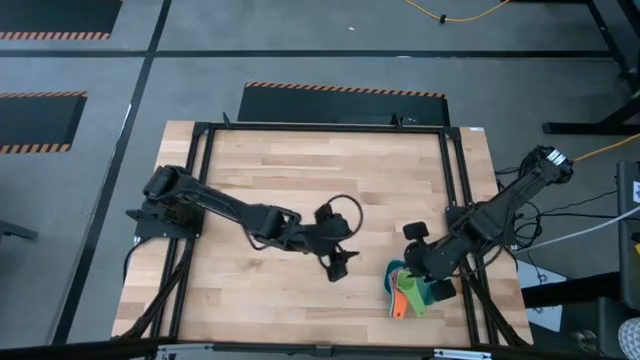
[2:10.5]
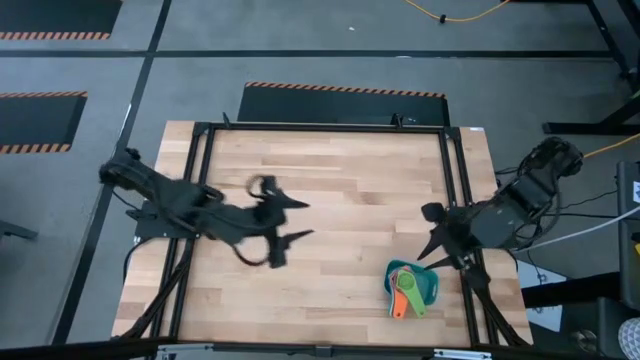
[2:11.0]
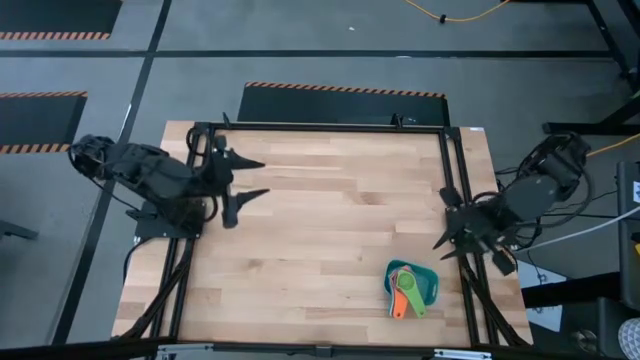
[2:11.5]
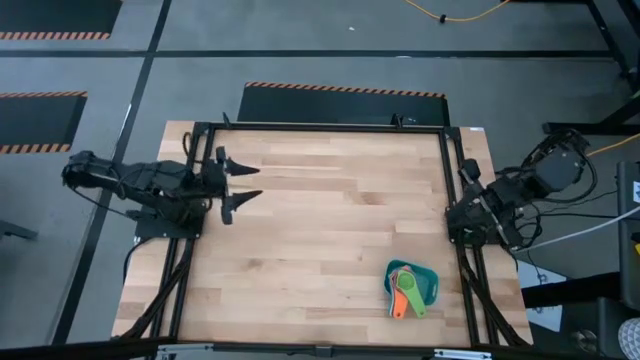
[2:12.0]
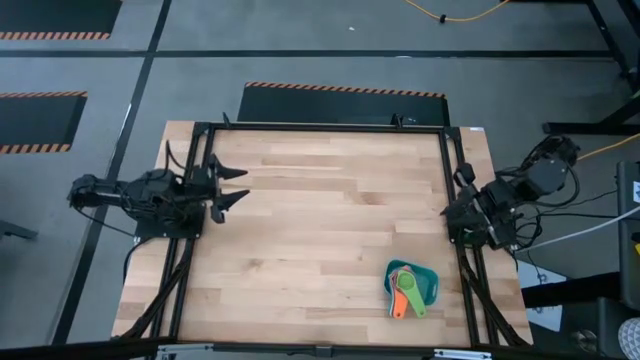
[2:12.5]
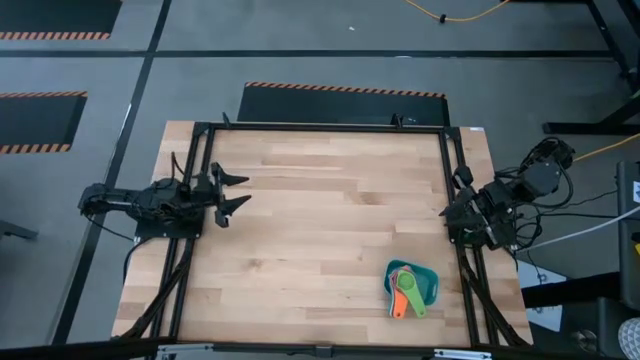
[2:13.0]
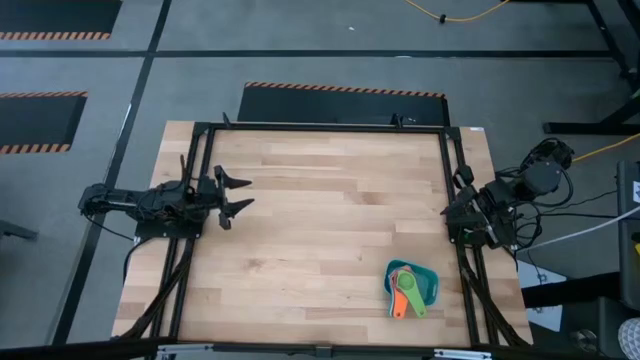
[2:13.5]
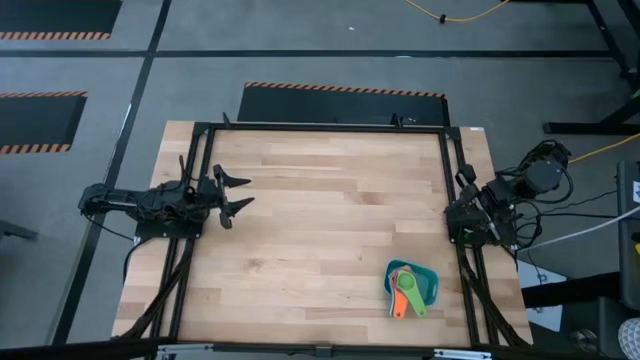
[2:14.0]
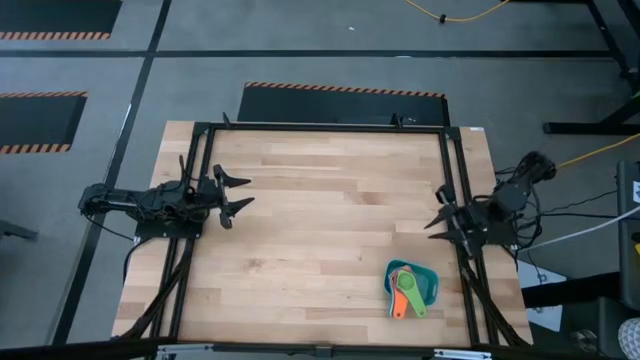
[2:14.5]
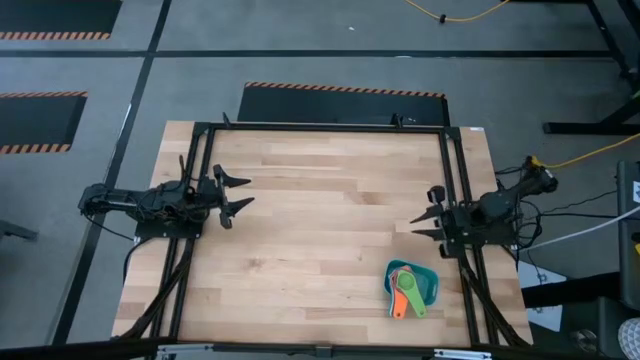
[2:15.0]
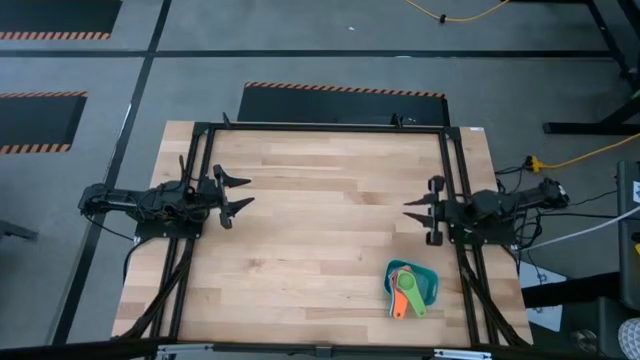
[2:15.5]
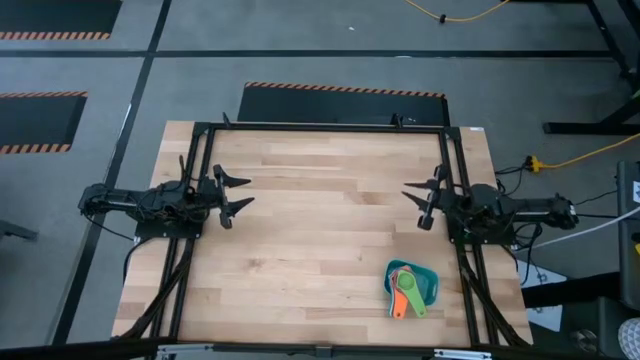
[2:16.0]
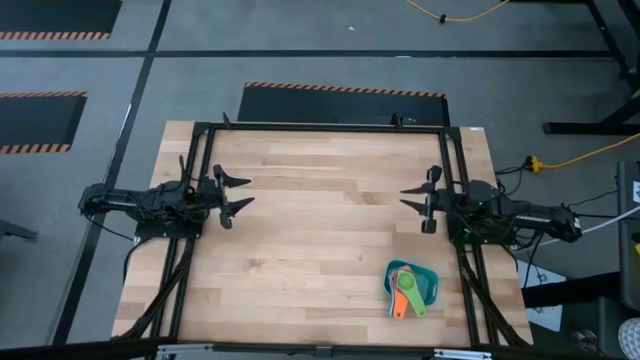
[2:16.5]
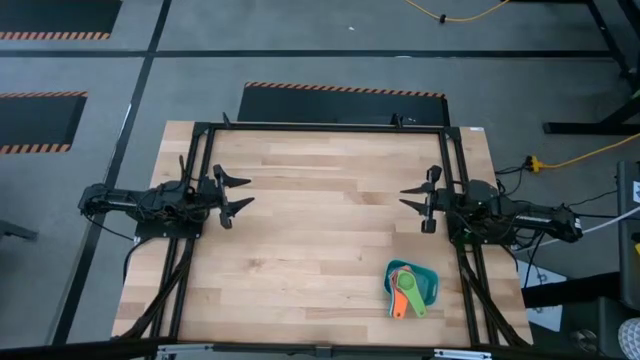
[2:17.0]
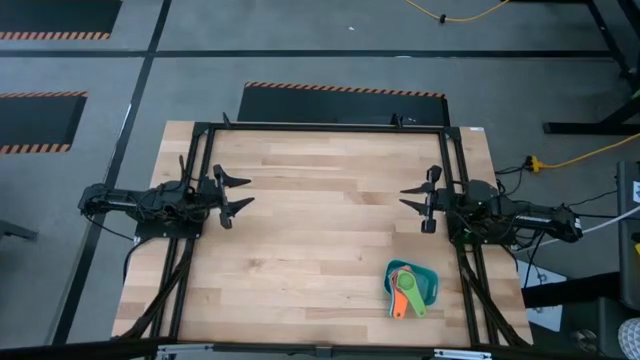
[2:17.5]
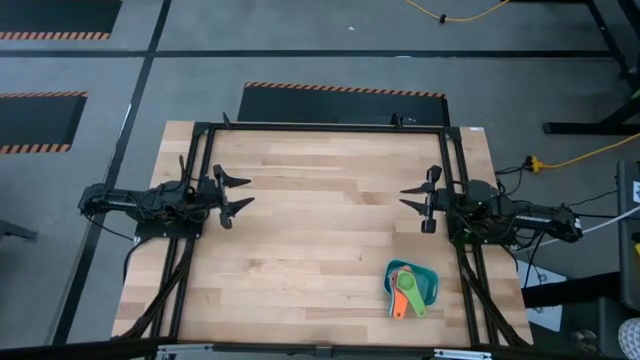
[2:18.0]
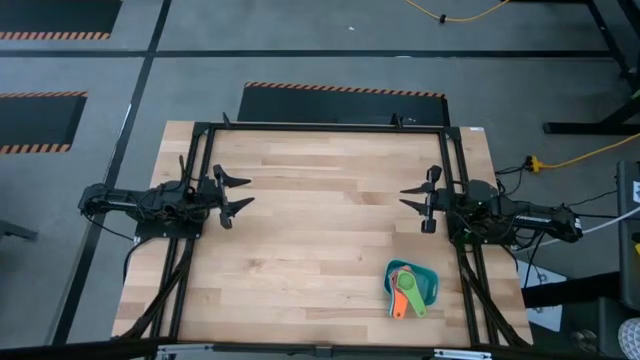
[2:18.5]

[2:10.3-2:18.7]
Task: Nest measuring cups in basket
Return to Home Position

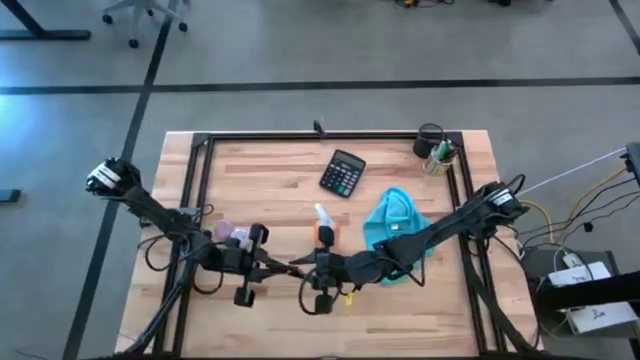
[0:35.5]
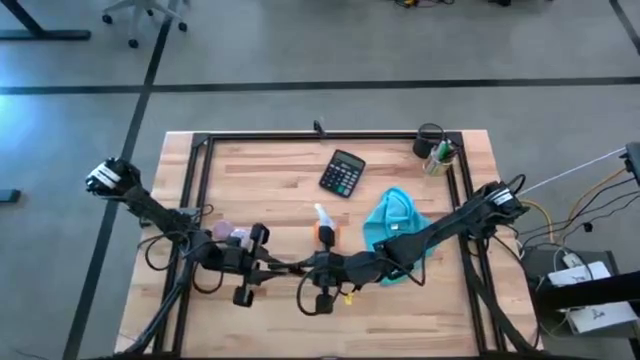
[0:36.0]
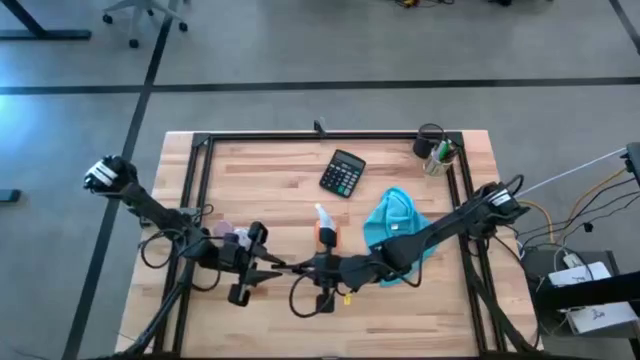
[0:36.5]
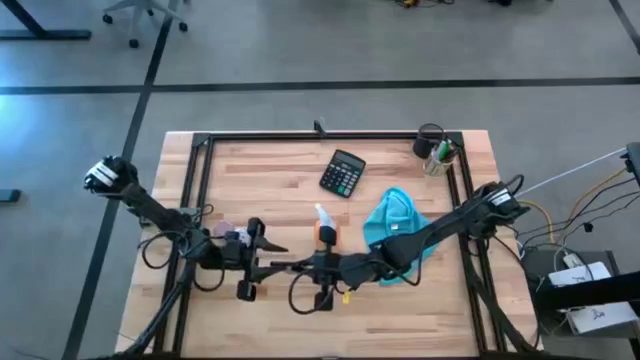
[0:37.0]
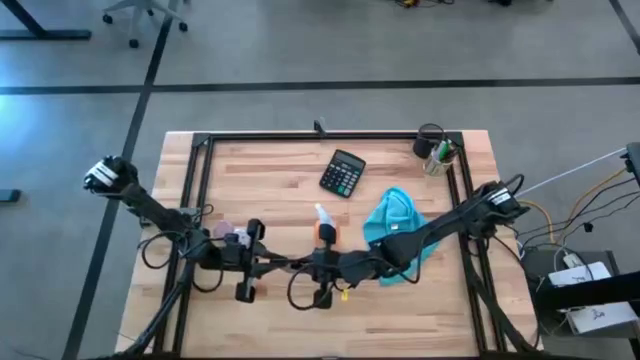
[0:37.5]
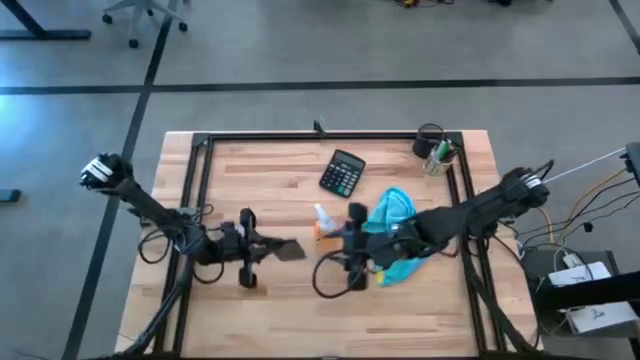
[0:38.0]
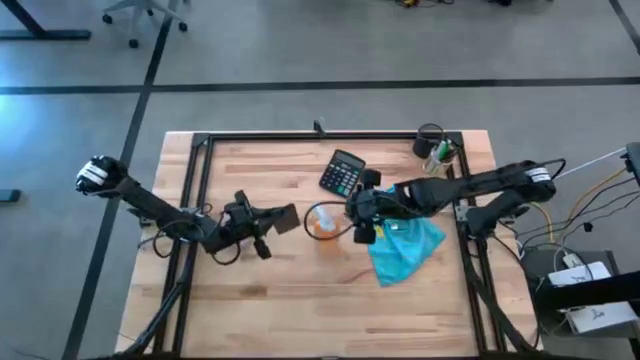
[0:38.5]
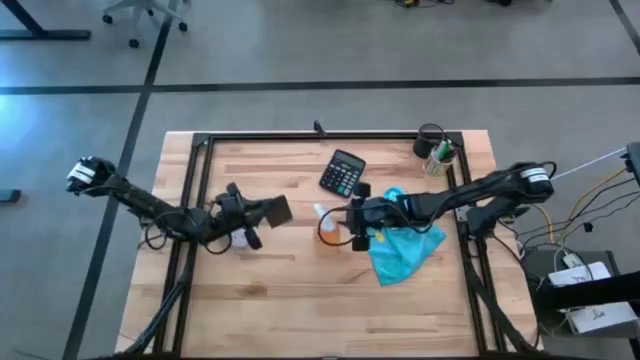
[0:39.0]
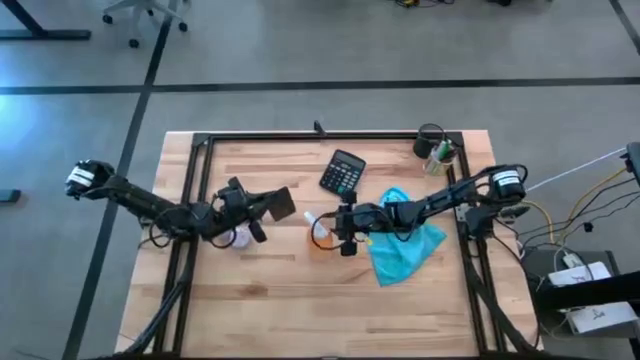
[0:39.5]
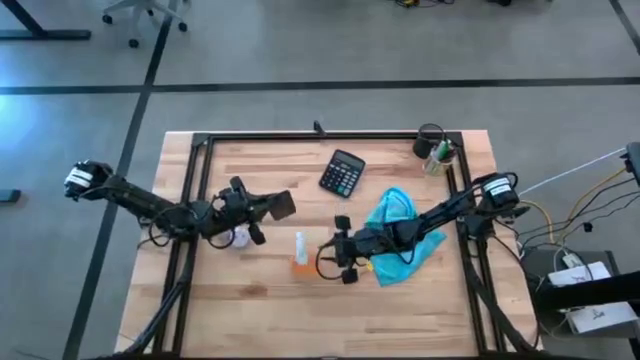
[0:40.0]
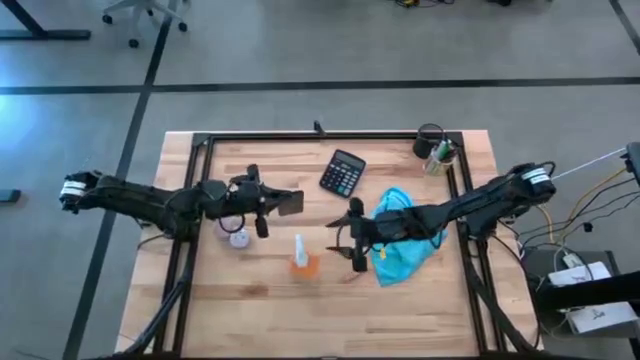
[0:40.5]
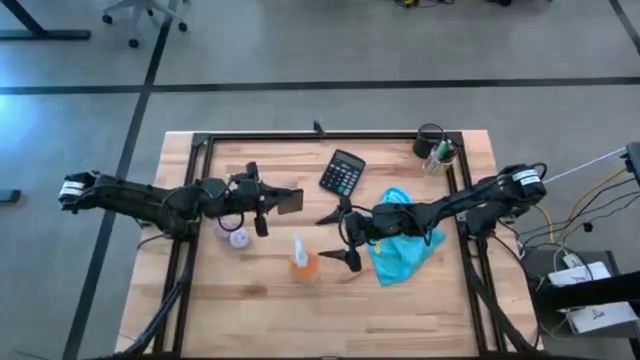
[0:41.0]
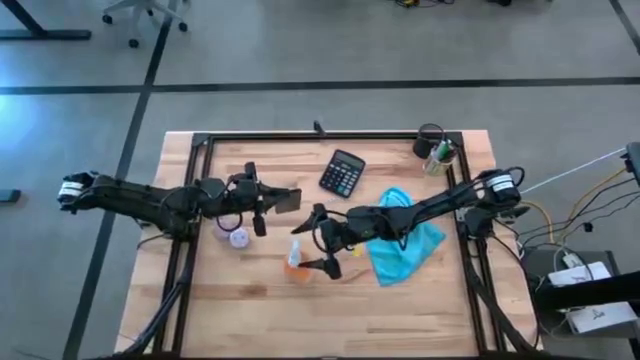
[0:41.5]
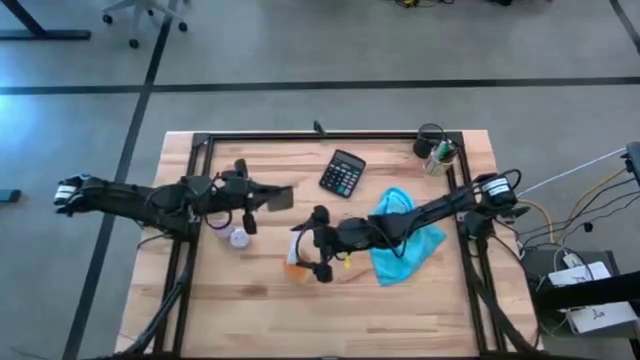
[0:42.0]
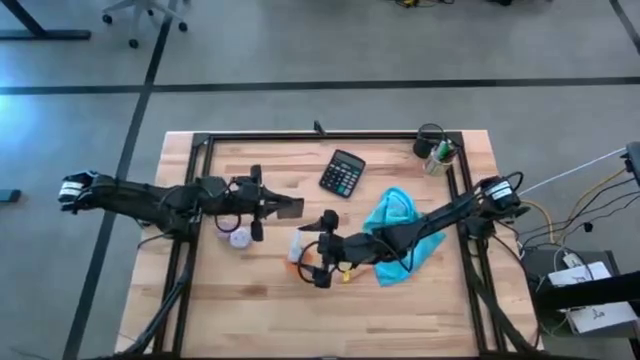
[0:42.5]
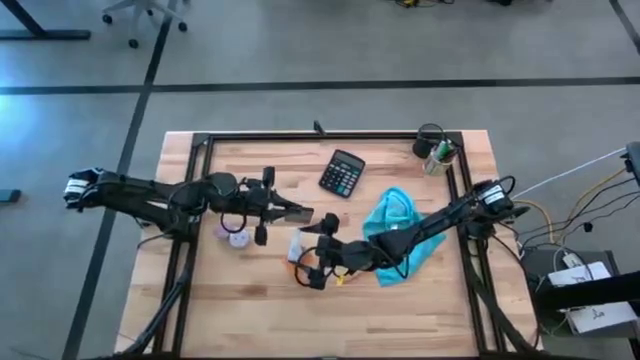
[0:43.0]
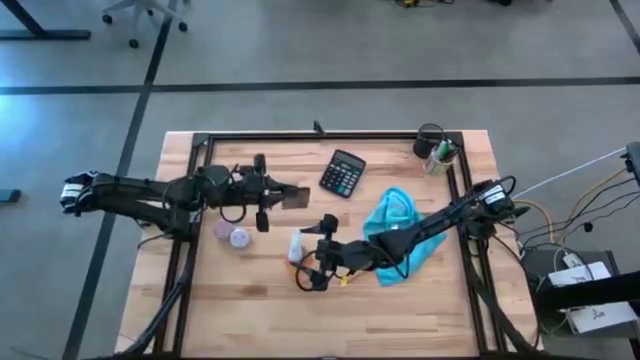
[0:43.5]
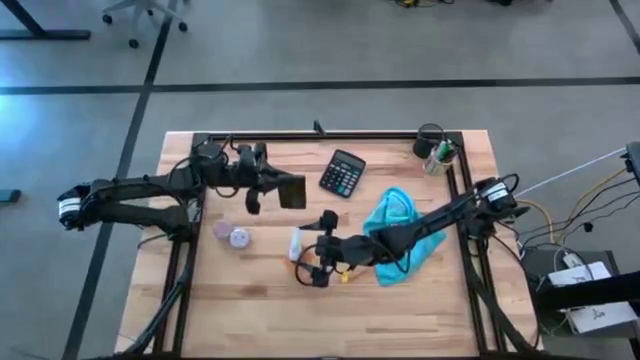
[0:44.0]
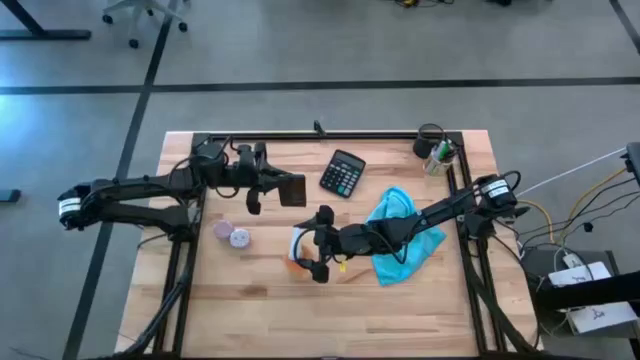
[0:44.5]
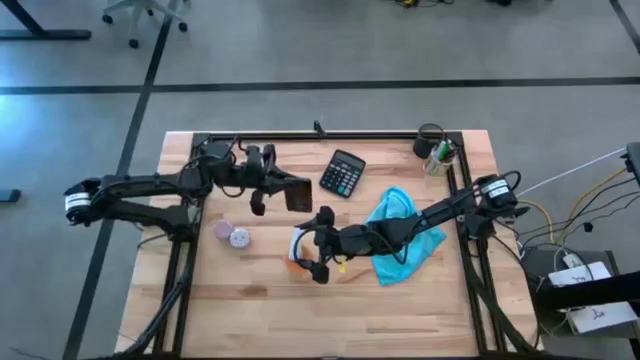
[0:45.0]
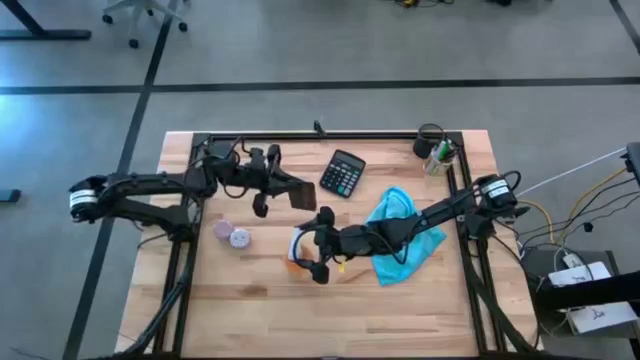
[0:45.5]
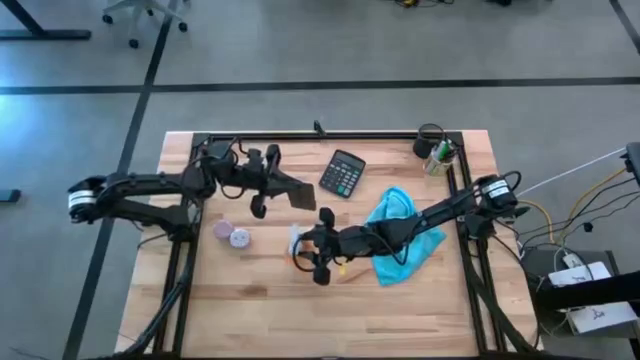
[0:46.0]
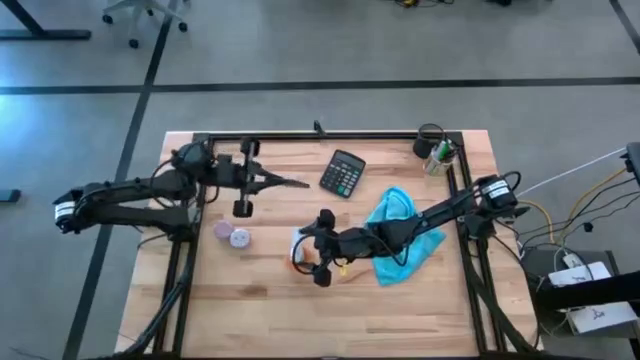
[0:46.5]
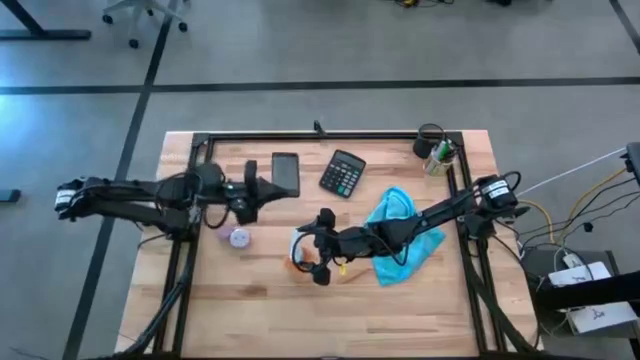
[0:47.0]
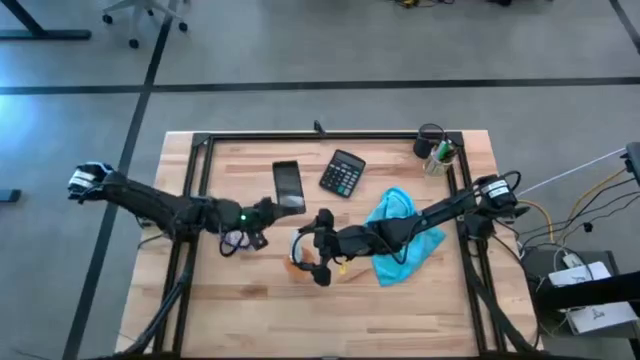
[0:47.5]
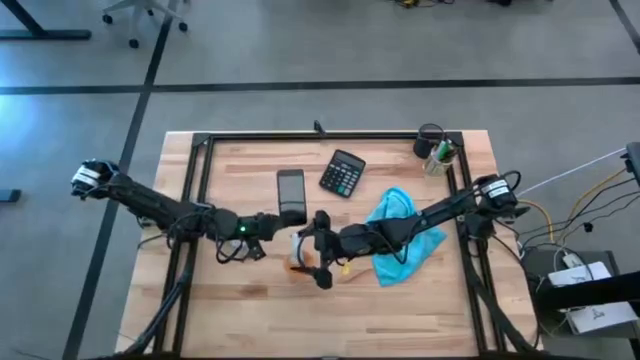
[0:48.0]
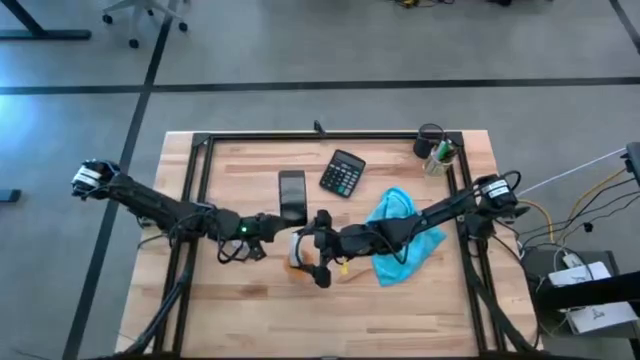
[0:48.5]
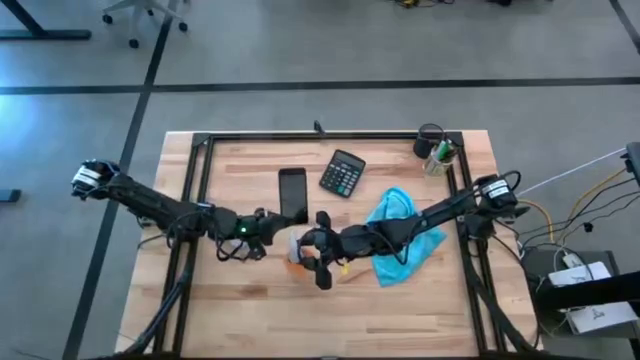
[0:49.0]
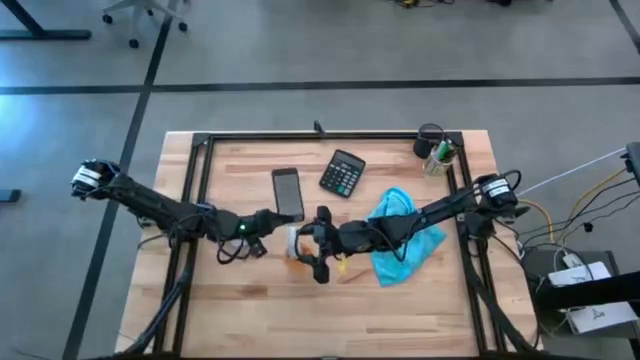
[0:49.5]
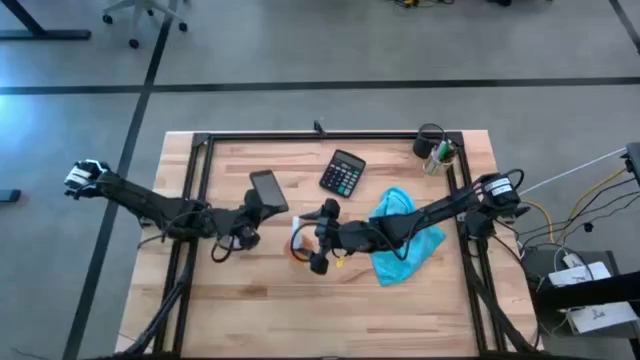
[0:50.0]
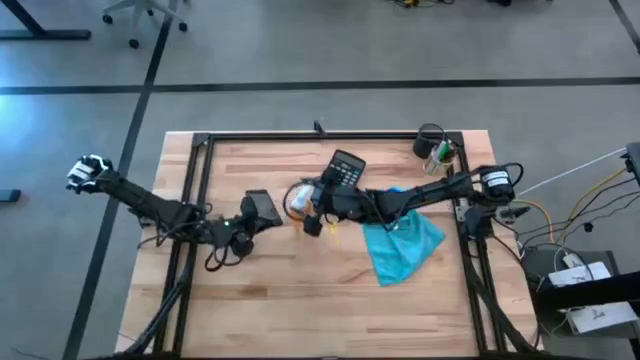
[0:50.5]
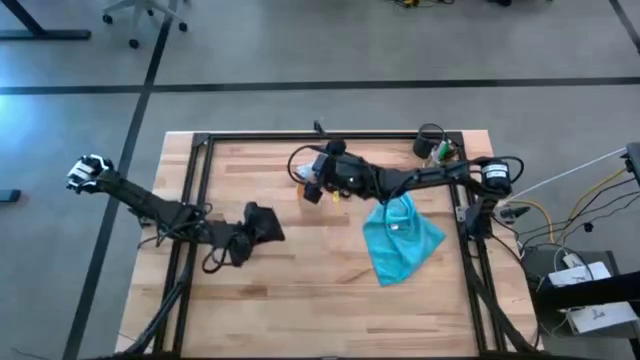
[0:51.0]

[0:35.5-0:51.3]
Task: Apply microfiber cloth
Spray the front and back of the cellphone using the spray bottle
